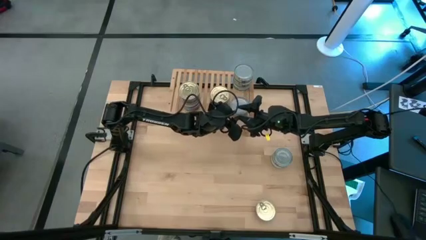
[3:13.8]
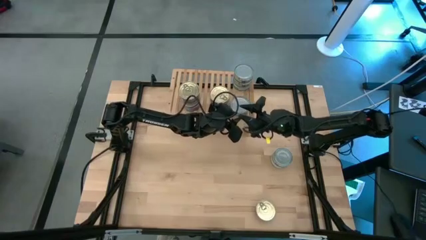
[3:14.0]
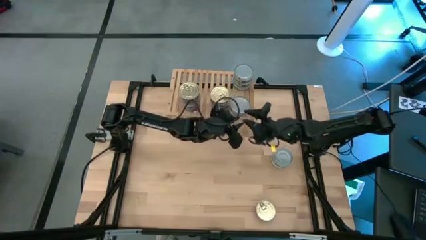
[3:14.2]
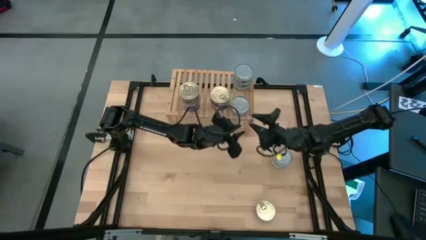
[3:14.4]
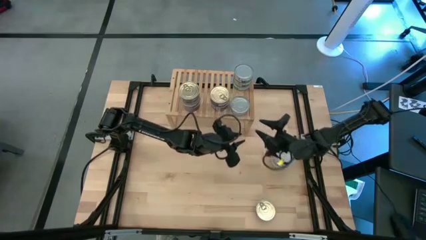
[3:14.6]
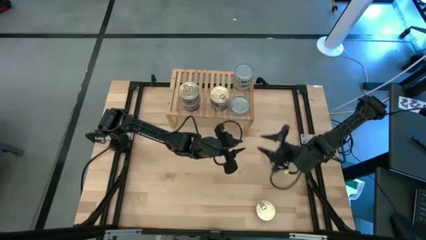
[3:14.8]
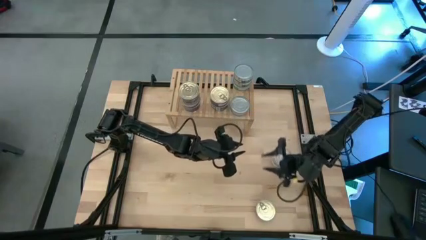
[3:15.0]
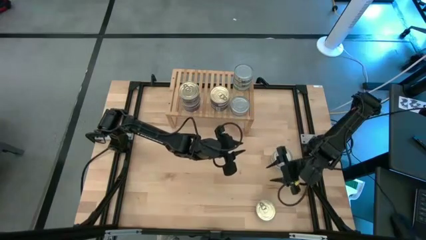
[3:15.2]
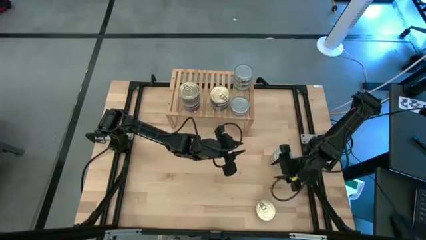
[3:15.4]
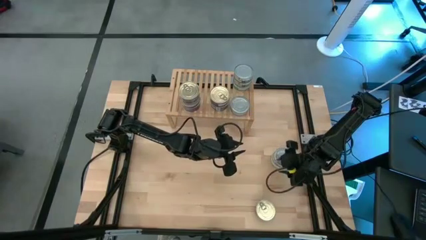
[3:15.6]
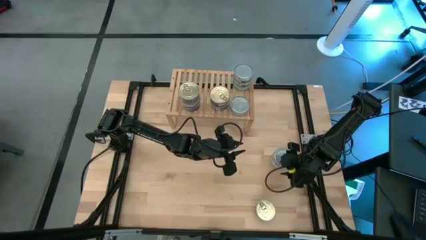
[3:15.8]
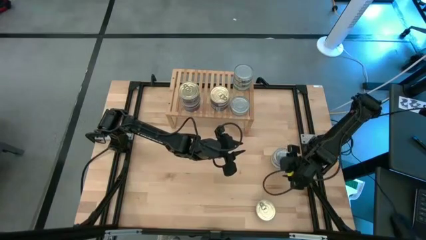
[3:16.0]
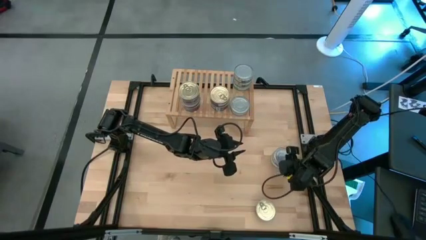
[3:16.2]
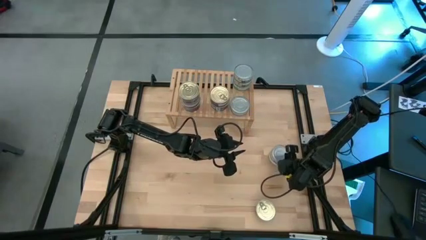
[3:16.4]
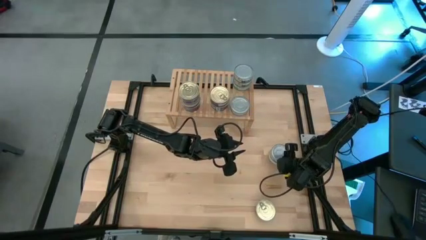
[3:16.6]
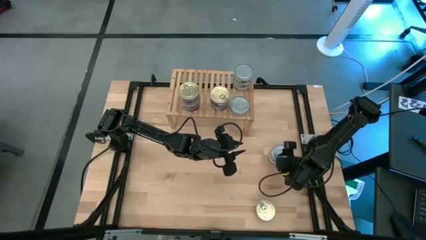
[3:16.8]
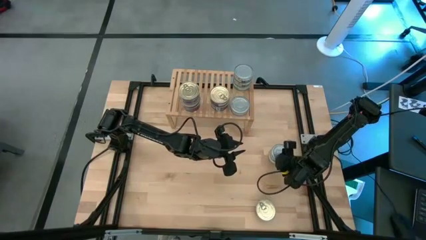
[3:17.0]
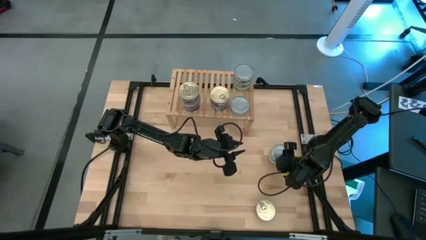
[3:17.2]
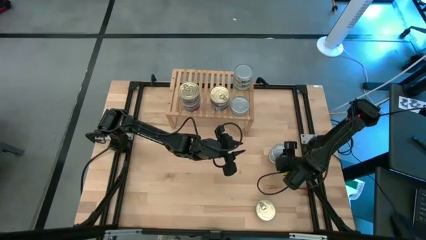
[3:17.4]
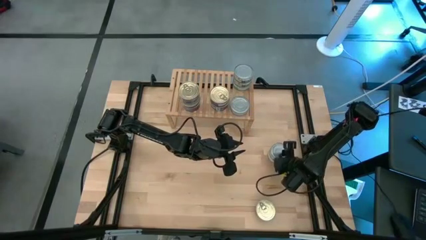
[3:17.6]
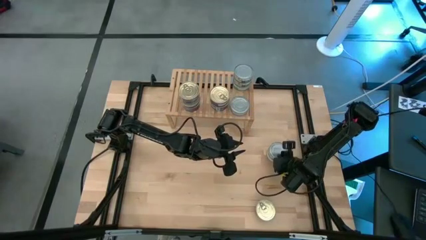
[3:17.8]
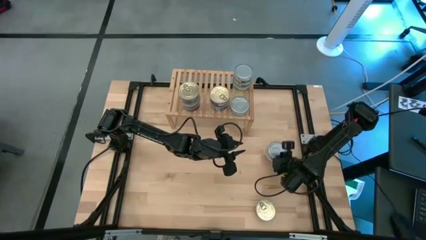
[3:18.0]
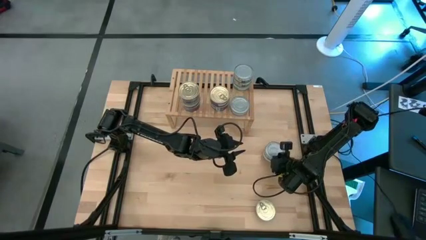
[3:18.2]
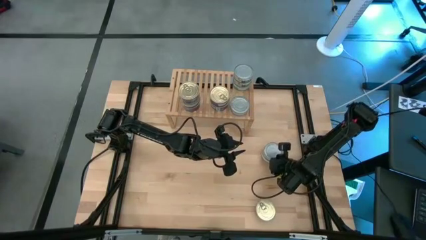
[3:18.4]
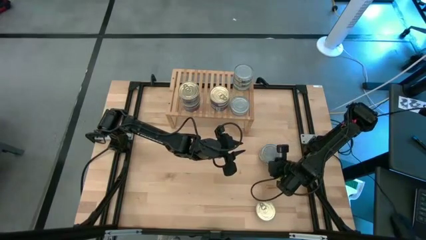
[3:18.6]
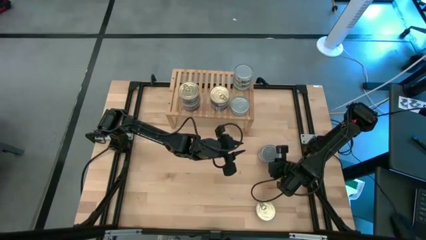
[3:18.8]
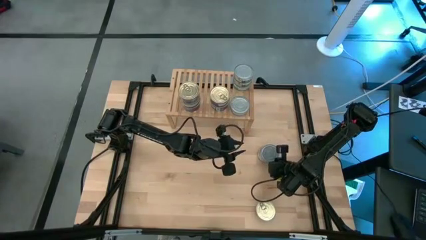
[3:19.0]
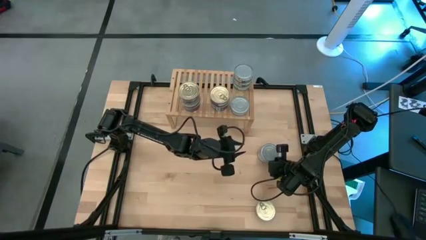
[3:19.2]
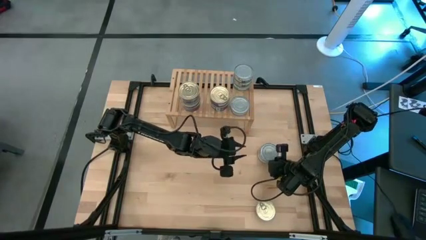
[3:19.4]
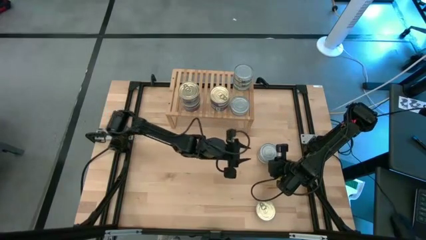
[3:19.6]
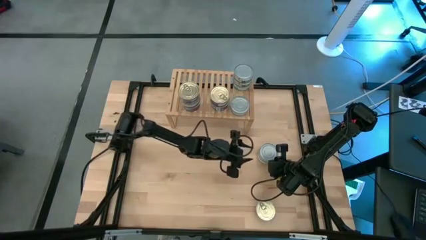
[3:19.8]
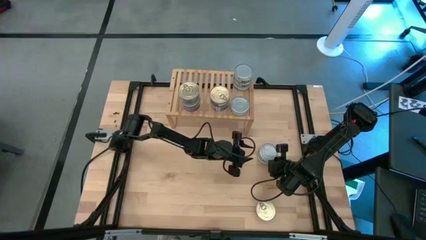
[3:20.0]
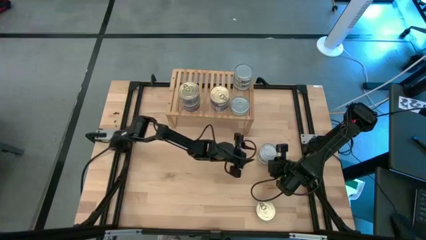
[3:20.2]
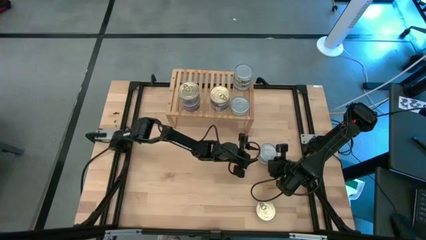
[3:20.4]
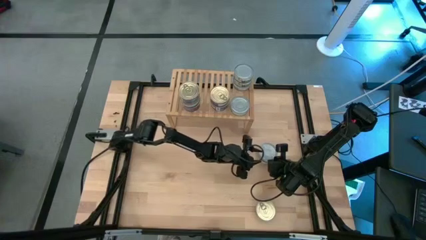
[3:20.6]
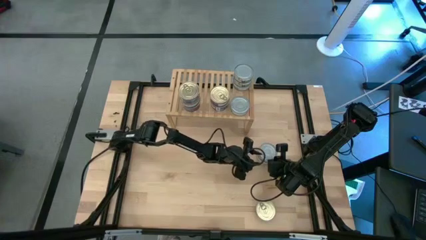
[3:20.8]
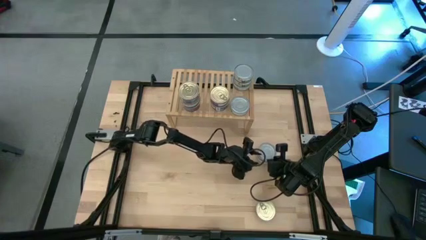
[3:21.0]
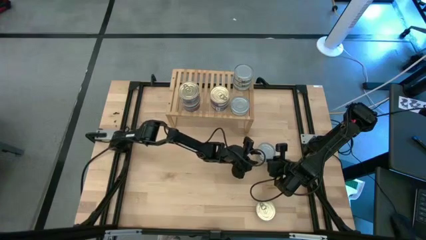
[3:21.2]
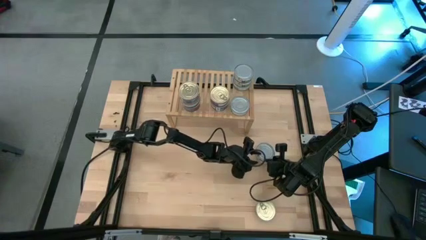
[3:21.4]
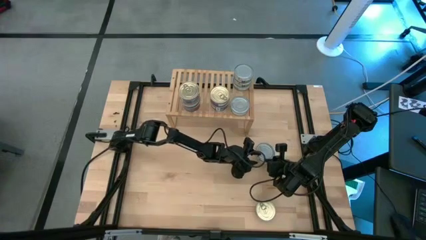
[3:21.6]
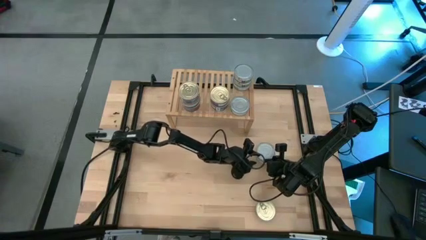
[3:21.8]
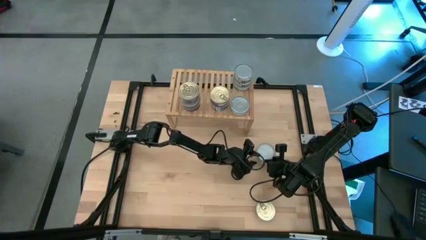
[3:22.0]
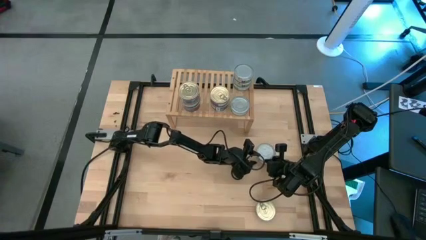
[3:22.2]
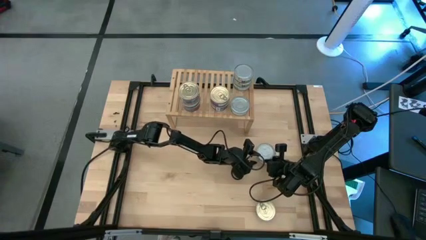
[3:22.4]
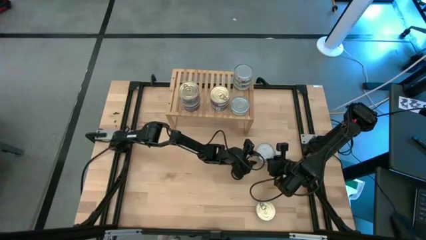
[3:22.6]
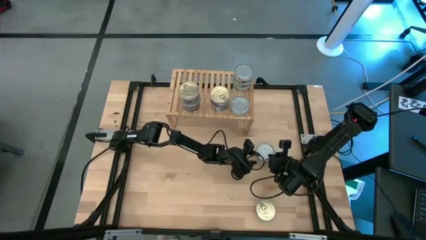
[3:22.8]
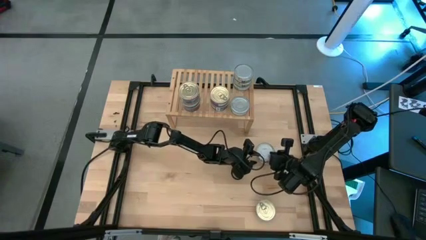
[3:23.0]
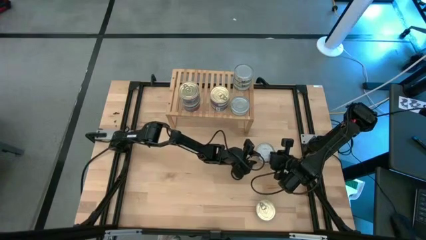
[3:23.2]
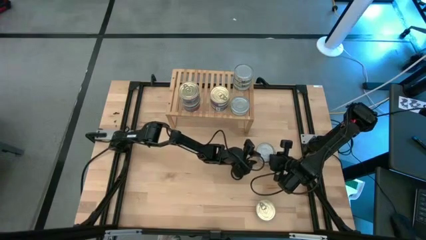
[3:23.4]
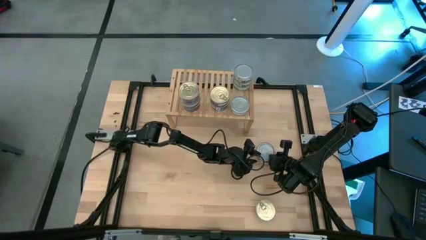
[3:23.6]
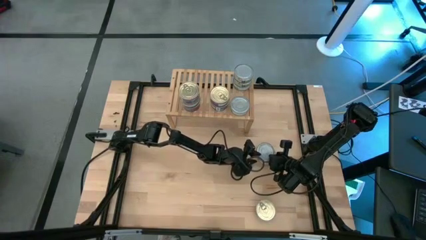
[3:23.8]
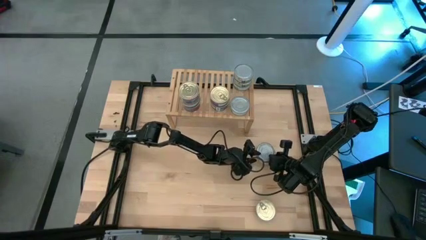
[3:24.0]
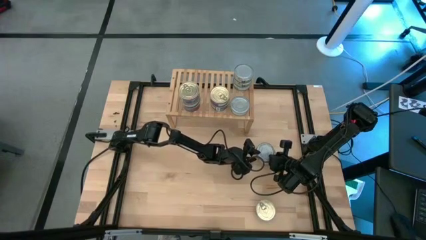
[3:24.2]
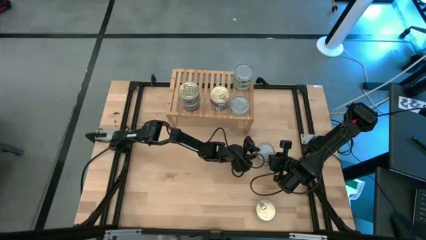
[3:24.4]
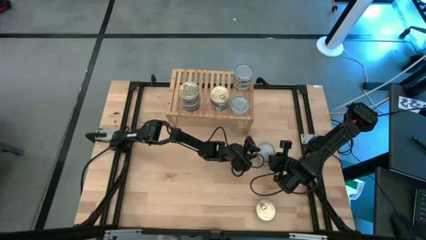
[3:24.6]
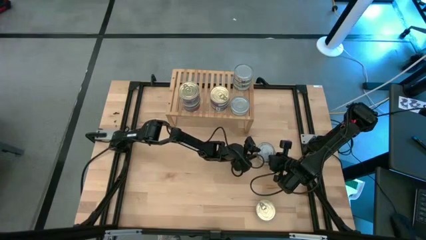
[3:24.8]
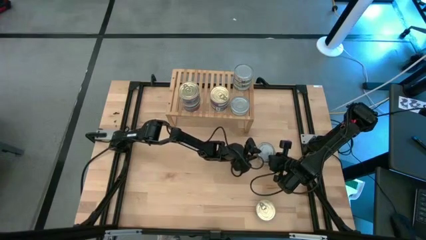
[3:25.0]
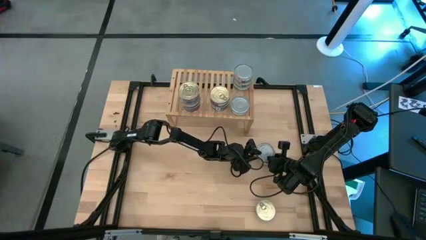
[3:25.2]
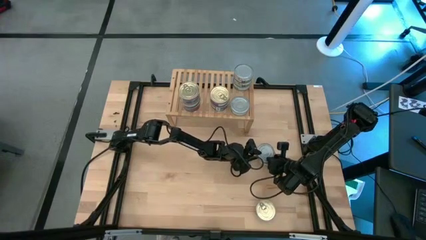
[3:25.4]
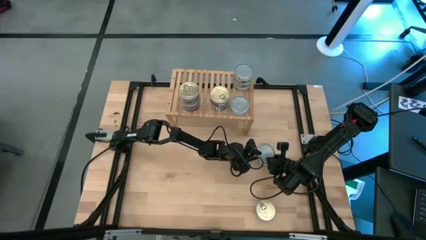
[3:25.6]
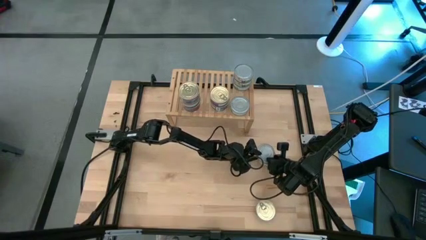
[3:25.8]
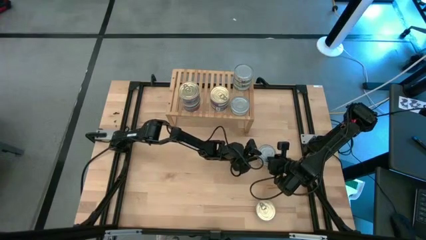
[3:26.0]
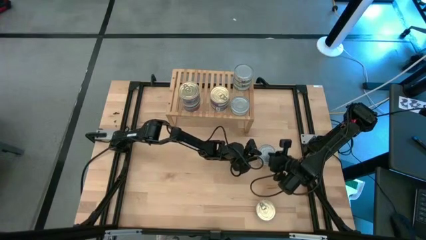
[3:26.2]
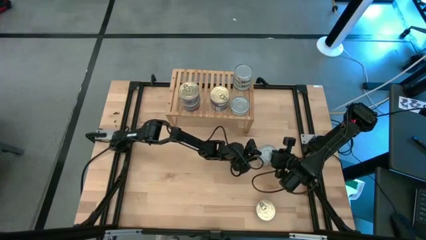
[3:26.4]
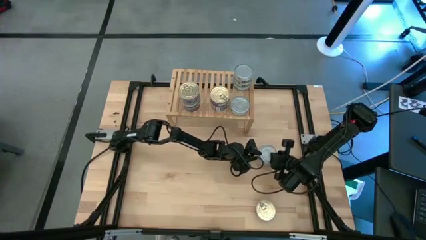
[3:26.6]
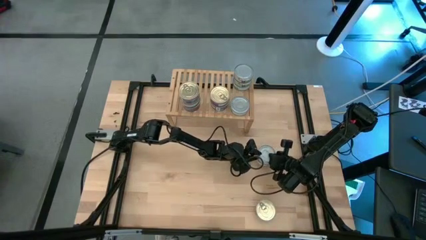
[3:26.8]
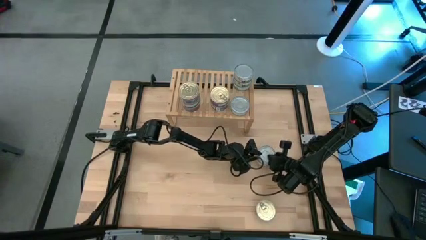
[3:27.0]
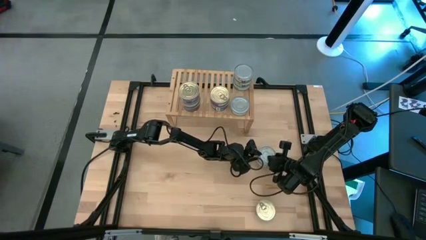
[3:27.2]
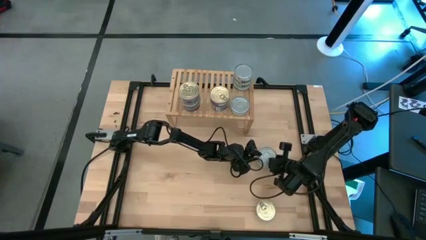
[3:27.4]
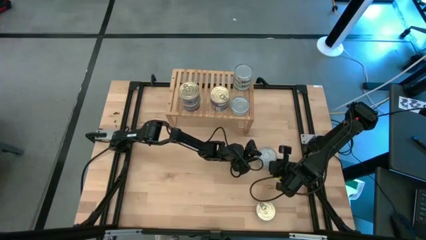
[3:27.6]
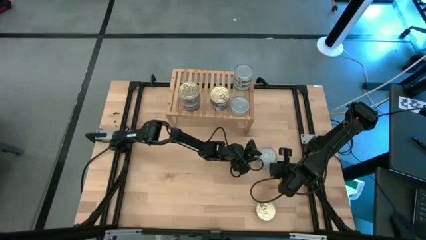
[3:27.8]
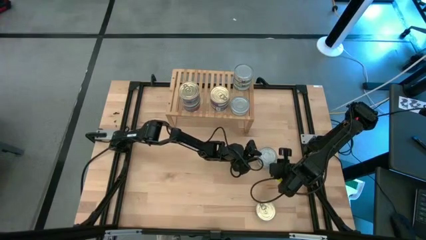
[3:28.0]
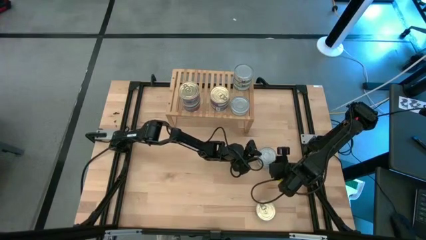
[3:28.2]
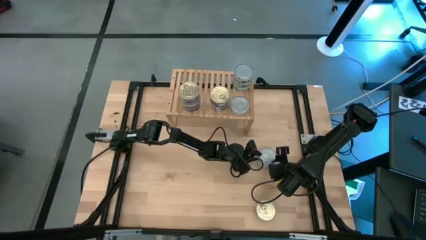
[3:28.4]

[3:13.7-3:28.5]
Task: Stack canned seafood by type on shelf
Stack the green tuna can on top of the green tuna can on the shelf
